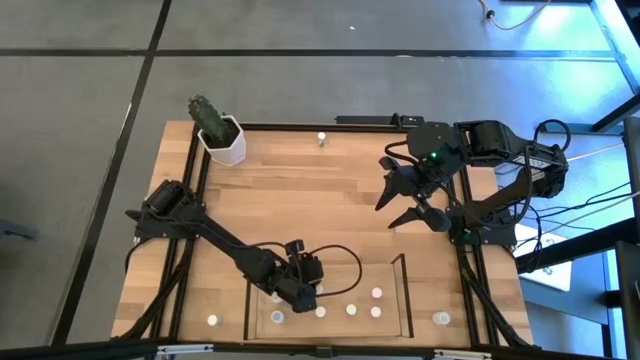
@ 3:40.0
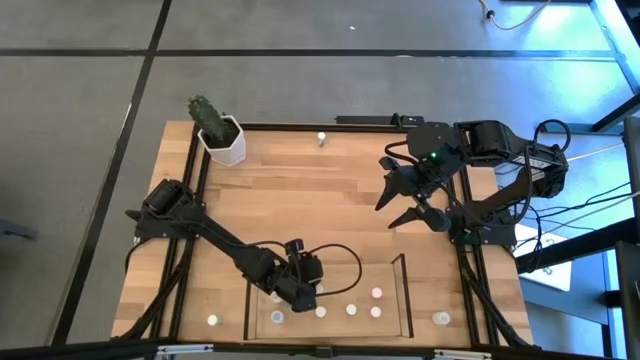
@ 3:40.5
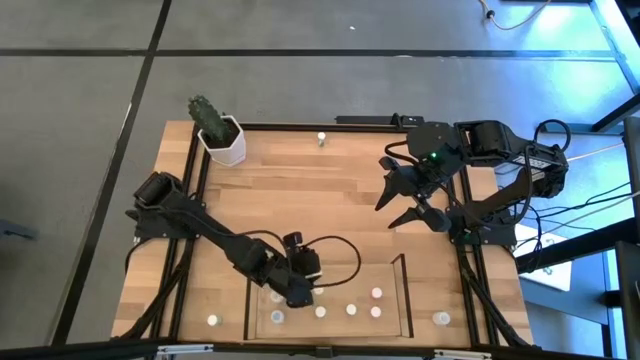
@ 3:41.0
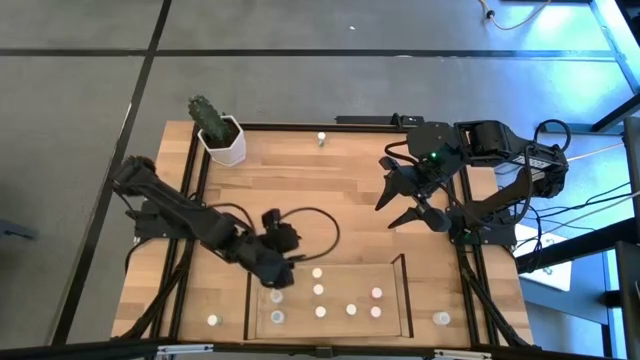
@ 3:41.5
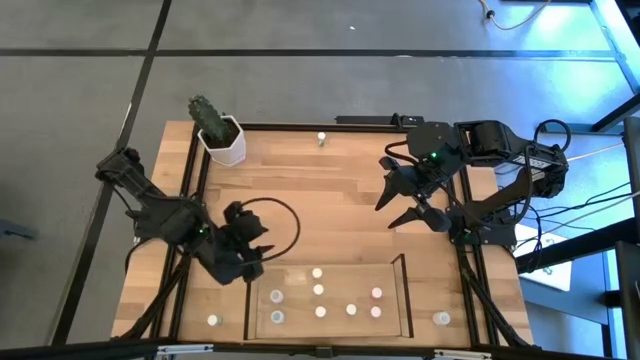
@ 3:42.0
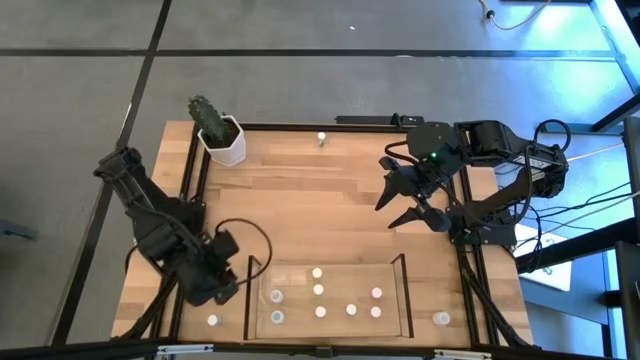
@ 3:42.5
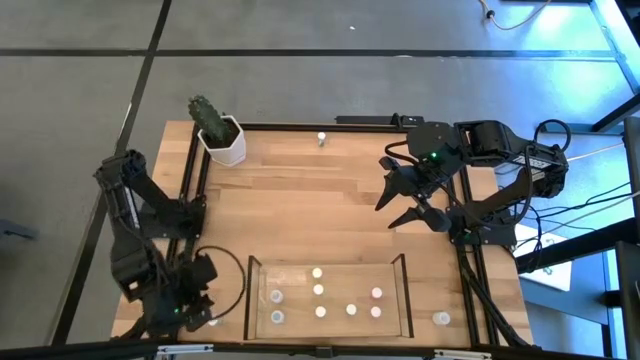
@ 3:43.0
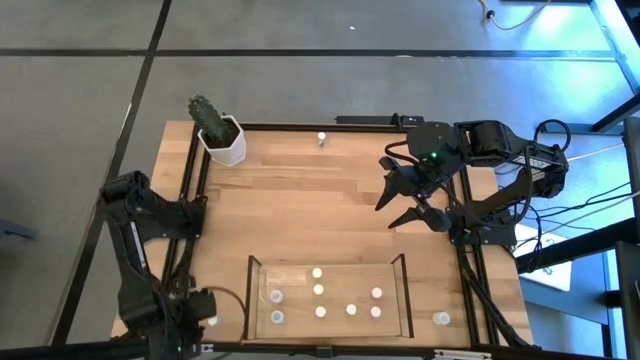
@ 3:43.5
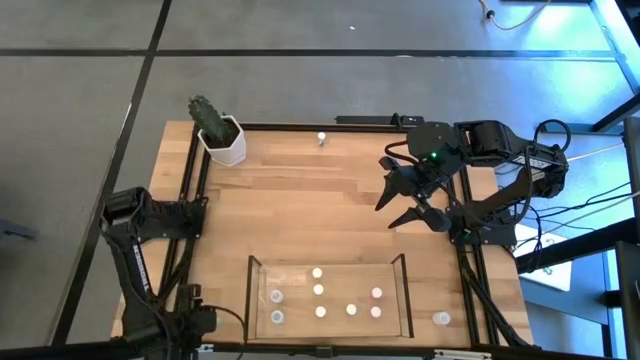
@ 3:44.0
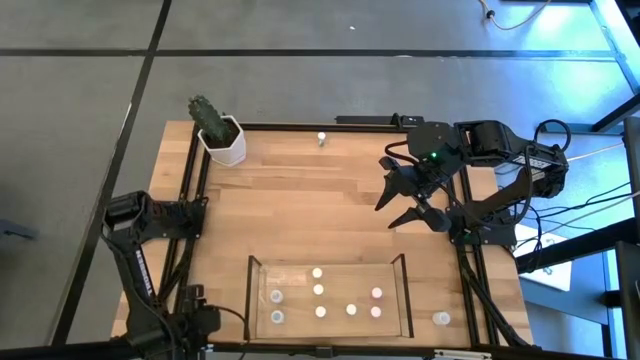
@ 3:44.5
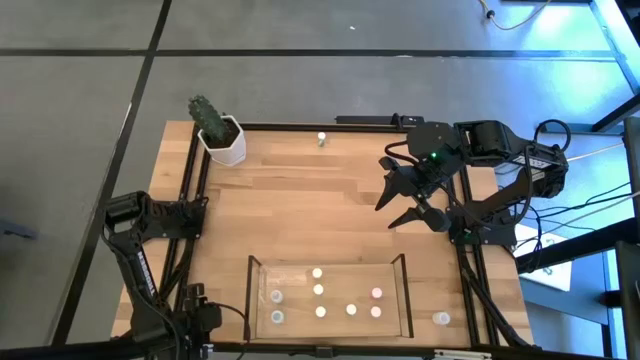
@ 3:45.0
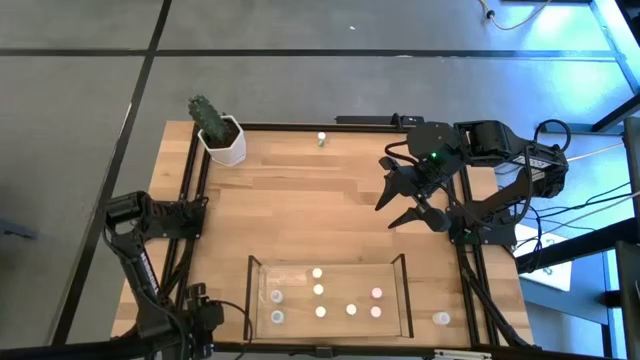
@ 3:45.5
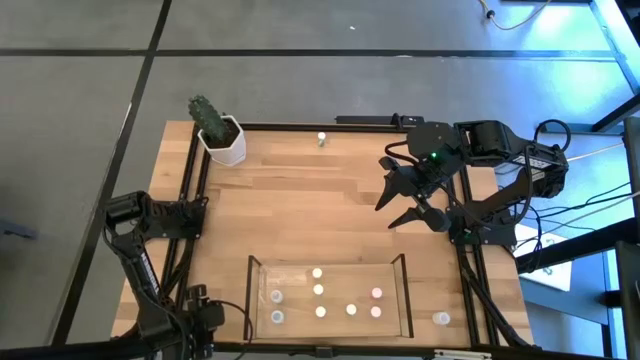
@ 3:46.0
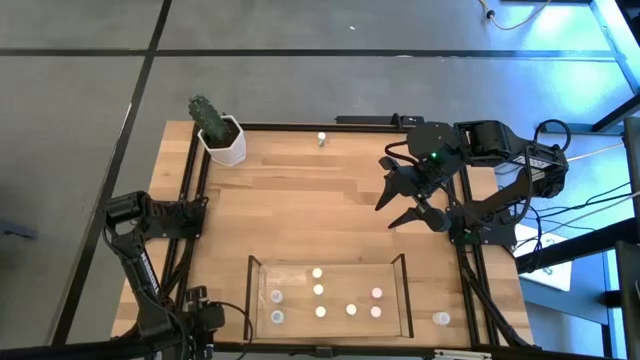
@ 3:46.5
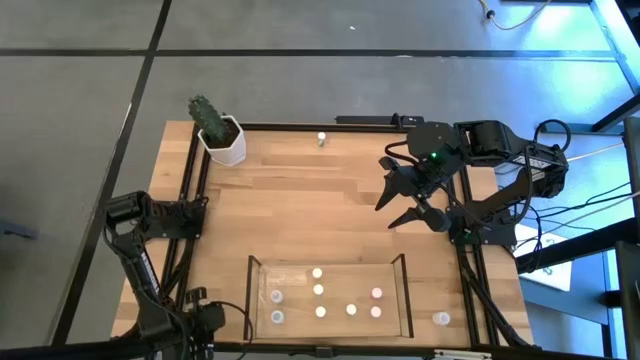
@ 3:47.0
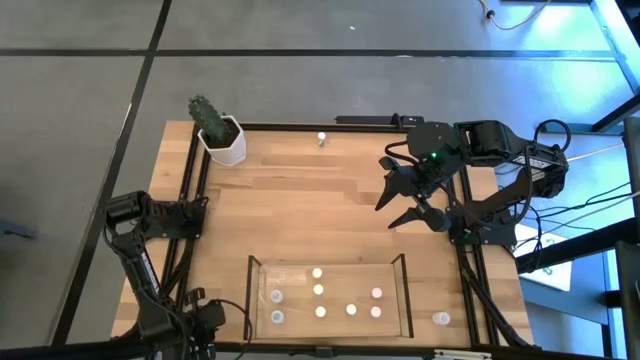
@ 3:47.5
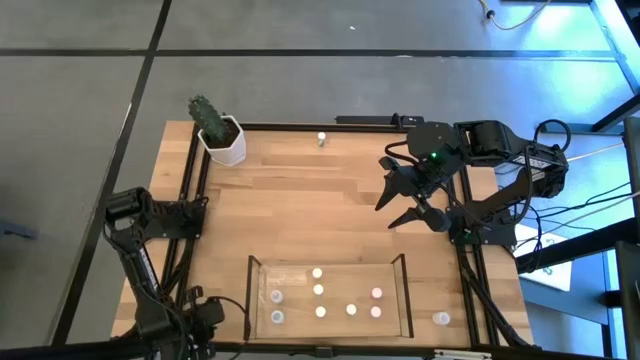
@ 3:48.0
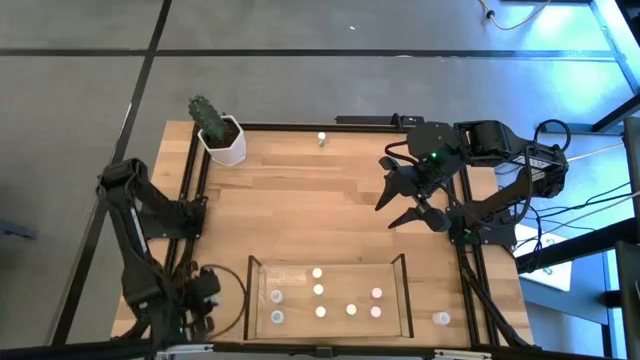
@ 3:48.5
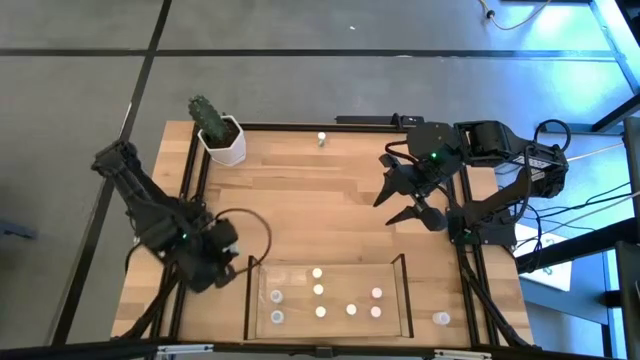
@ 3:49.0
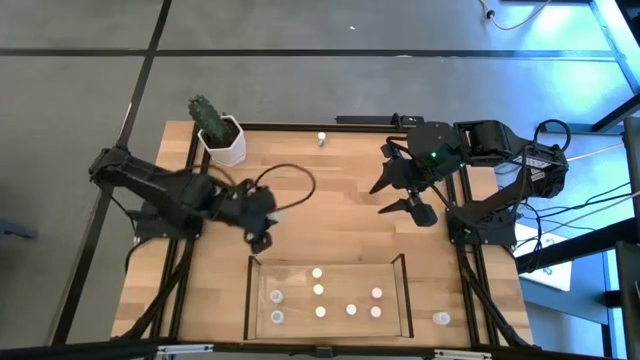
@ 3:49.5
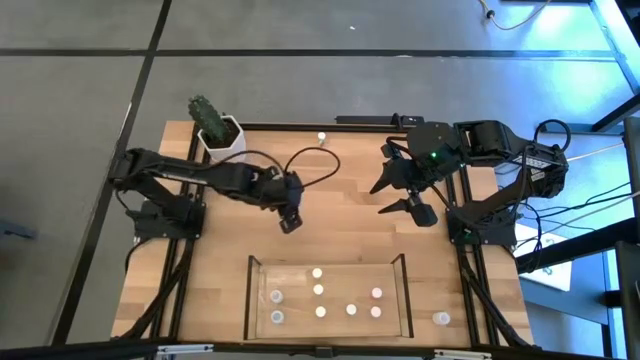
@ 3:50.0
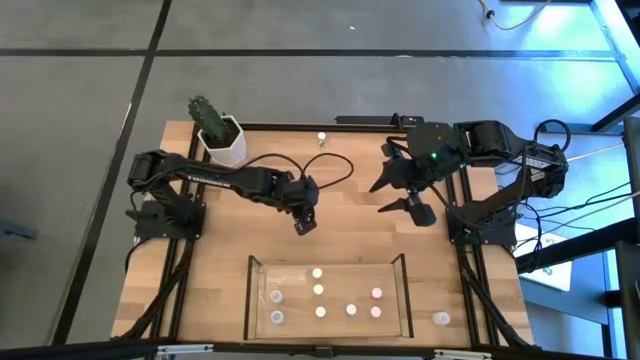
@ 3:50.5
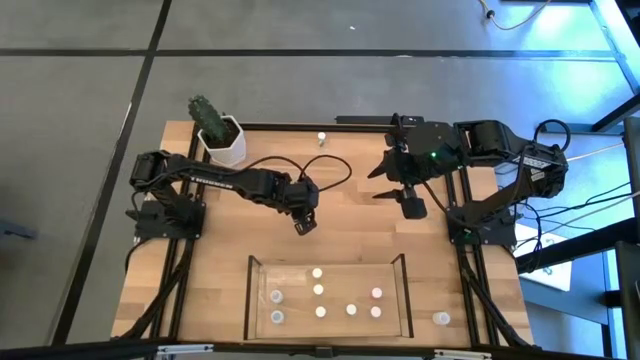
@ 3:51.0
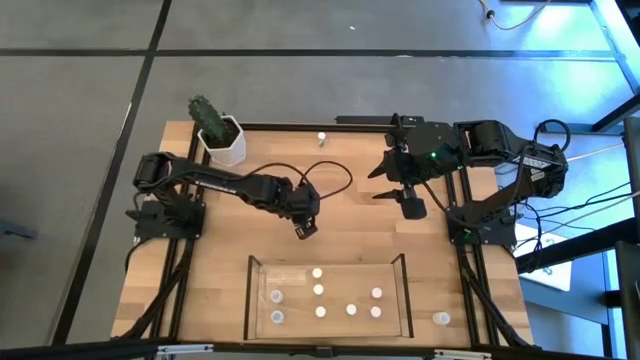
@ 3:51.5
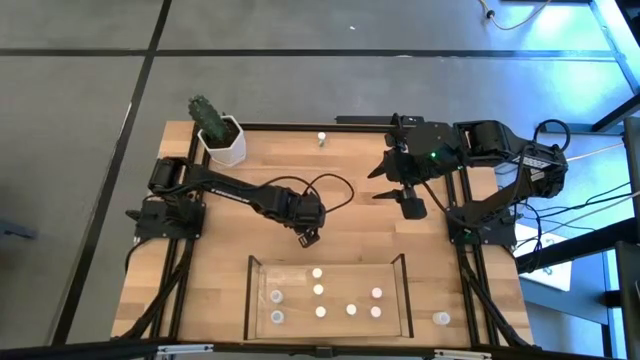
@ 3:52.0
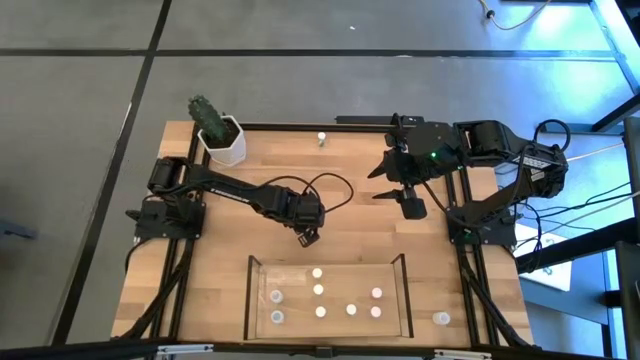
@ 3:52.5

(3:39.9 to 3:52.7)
Task: Pick and place medicine bottles onto shelf by color
Put the bottom blue pill bottle on the shelf aligned with the other blue pill bottle

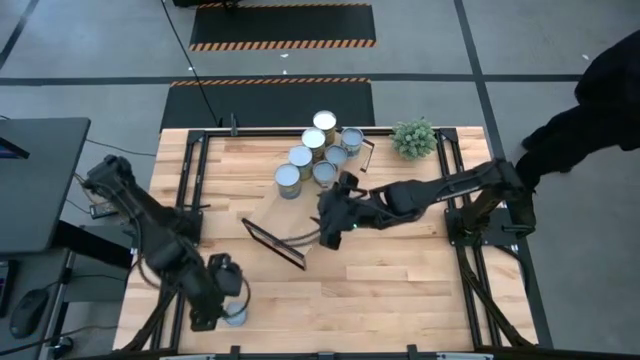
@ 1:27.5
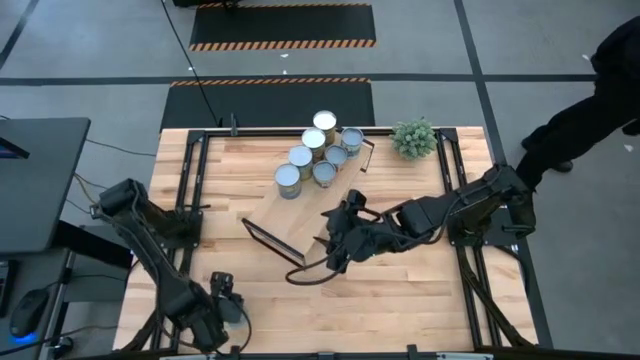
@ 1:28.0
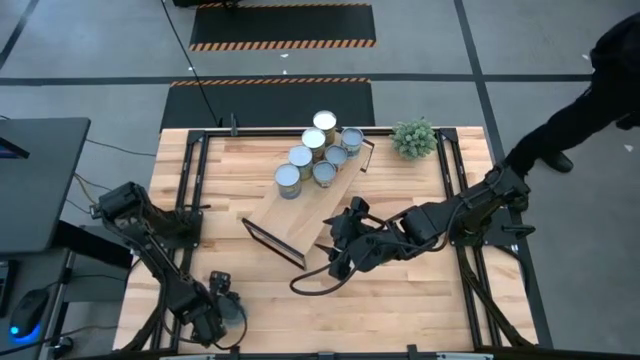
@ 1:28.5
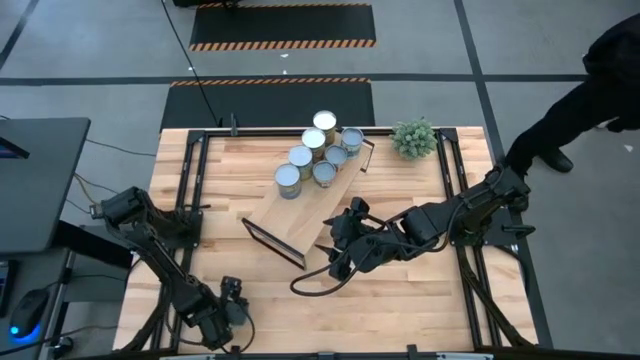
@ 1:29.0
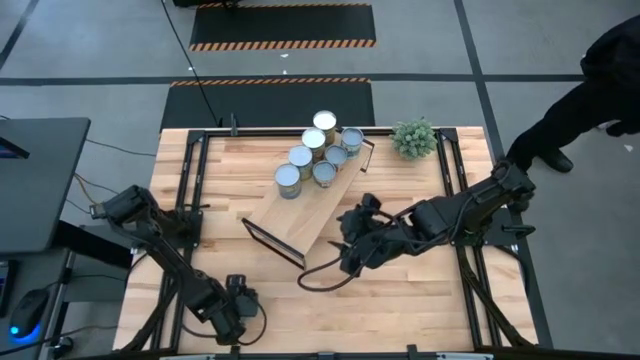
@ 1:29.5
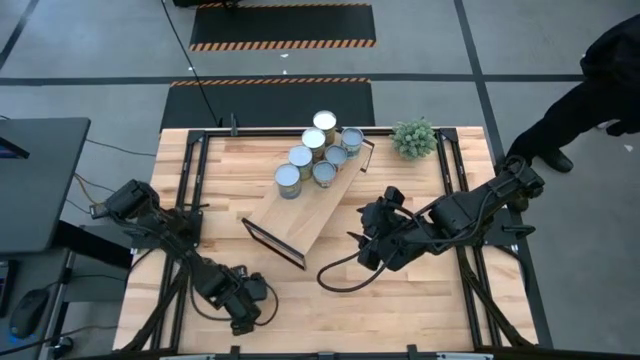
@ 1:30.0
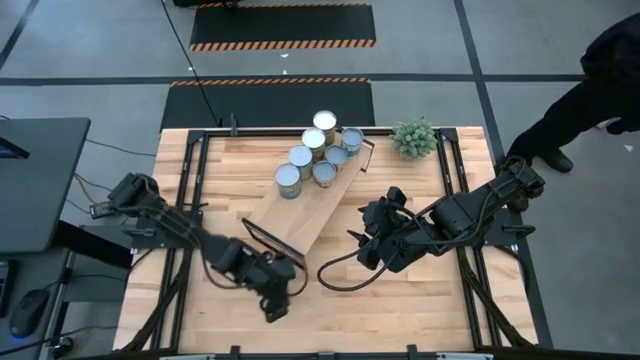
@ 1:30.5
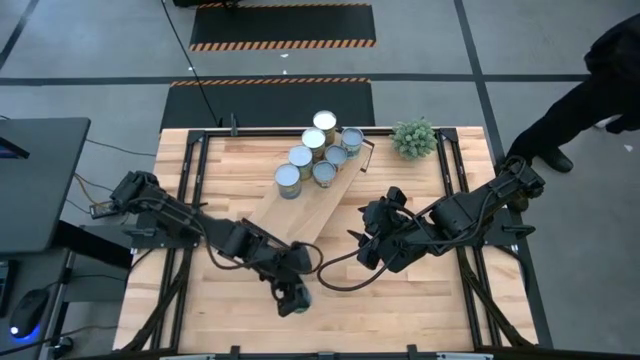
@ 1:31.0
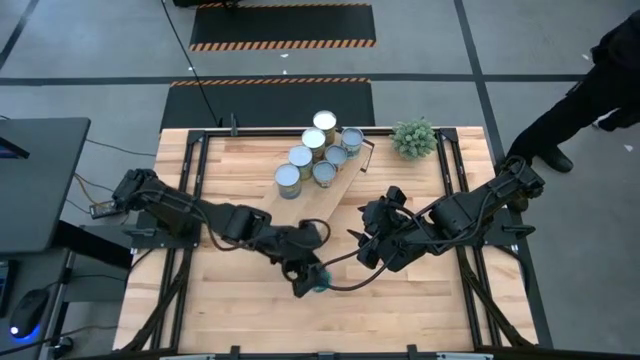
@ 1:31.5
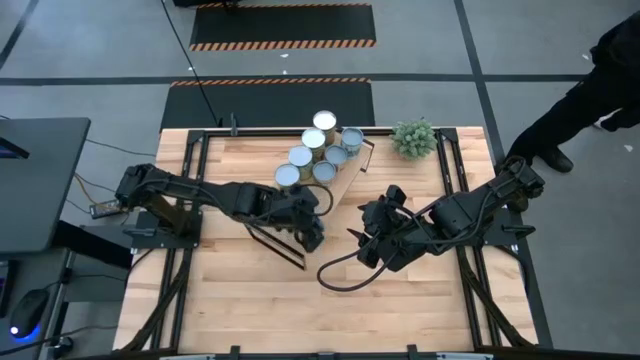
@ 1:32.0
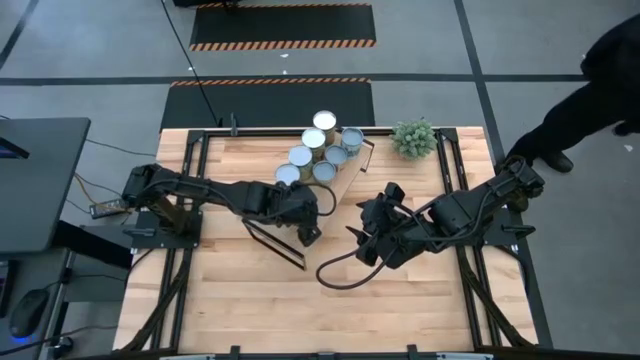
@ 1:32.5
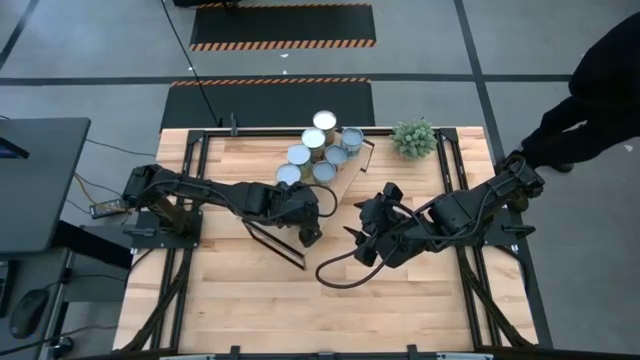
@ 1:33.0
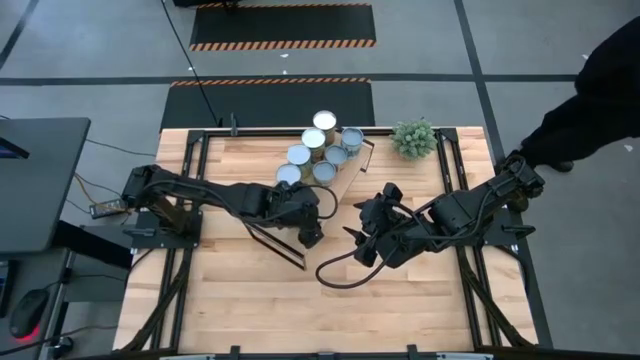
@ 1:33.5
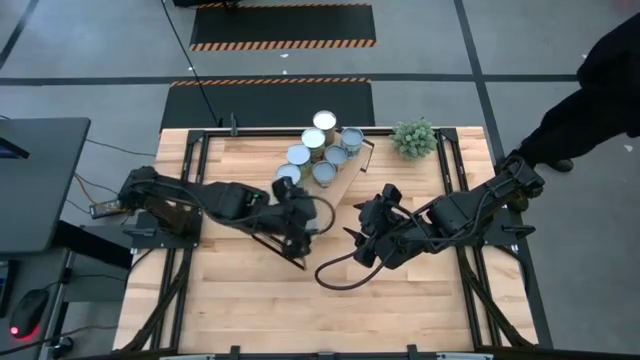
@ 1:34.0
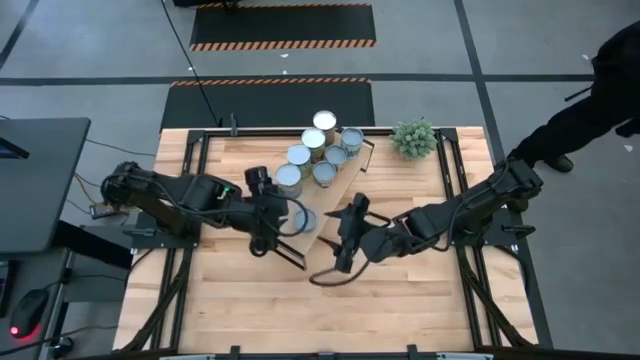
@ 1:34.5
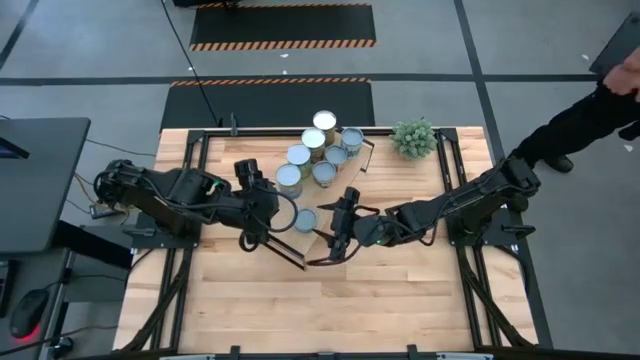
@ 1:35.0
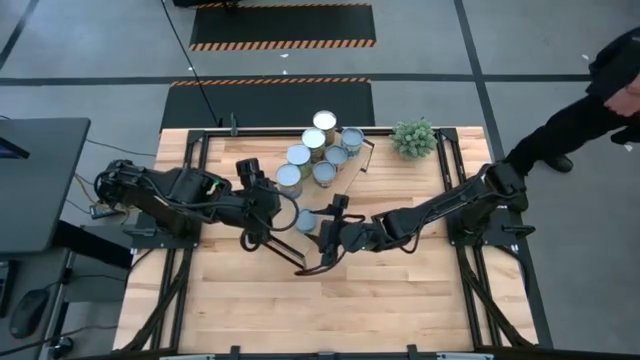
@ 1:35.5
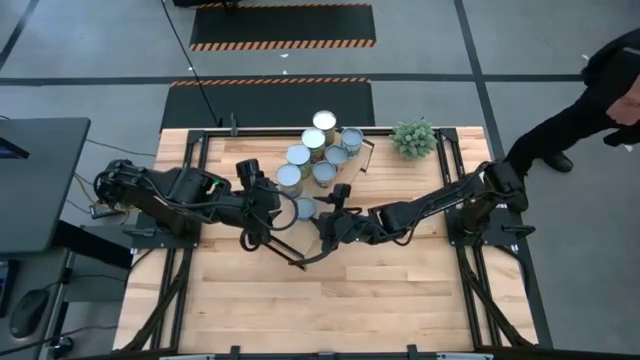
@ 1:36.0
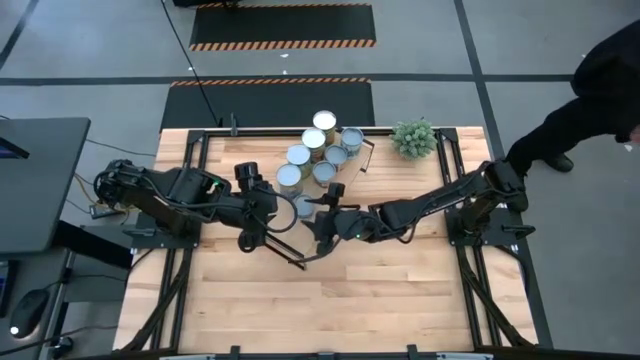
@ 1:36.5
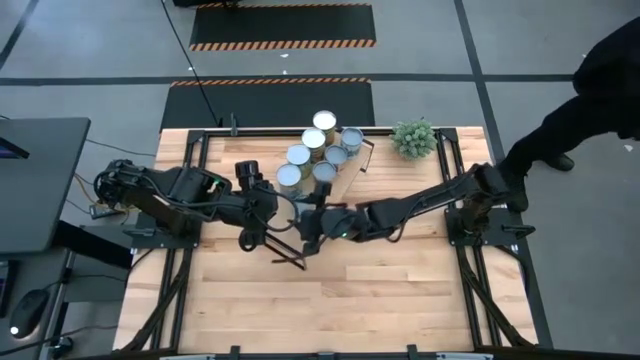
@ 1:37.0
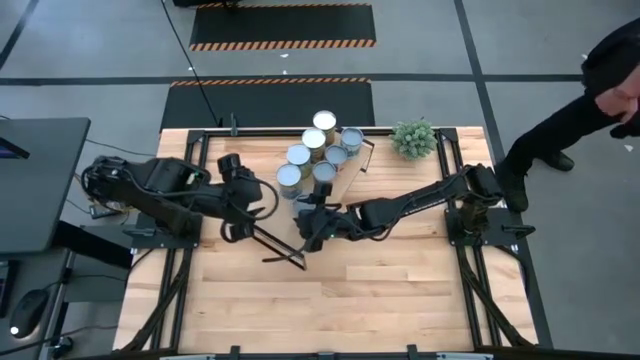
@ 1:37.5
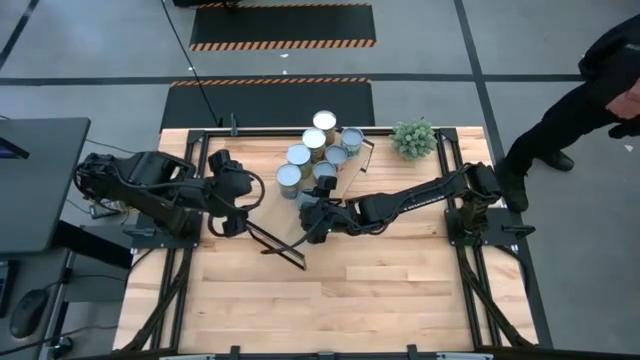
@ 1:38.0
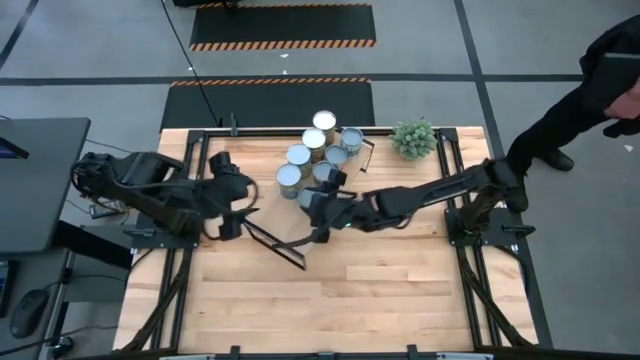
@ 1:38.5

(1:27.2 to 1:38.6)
Task: Pick and place cans onto a shelf
Put the canned tuna on the shelf
